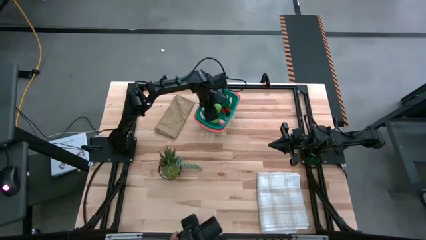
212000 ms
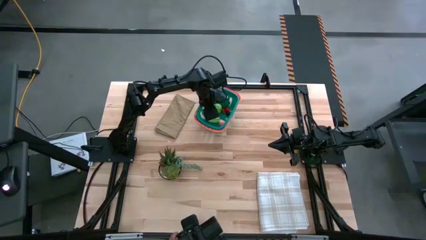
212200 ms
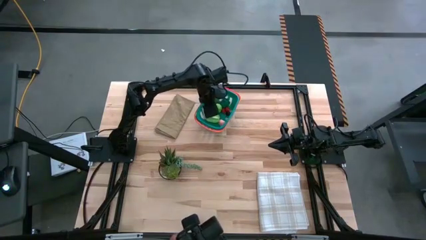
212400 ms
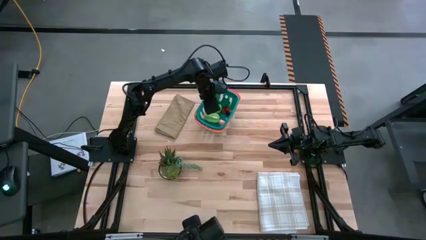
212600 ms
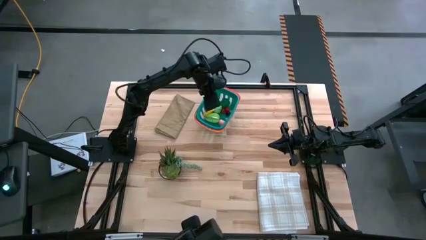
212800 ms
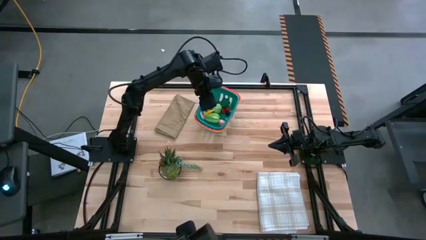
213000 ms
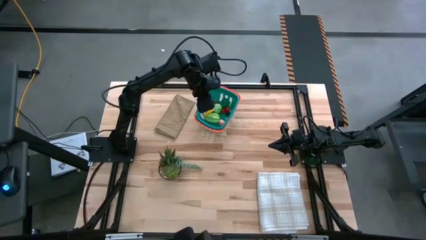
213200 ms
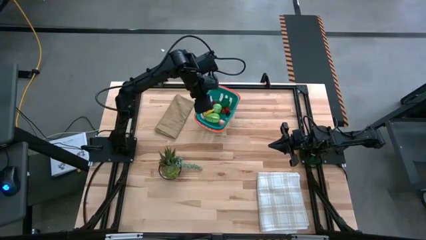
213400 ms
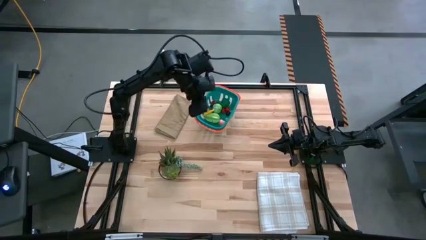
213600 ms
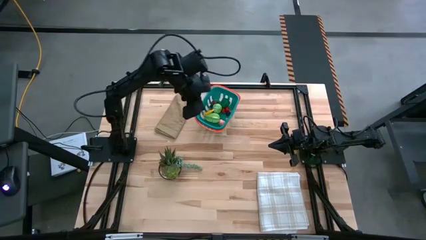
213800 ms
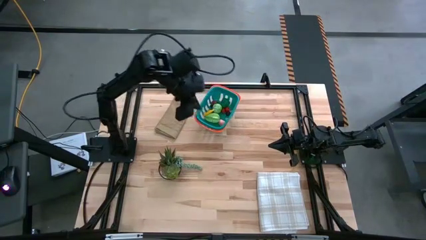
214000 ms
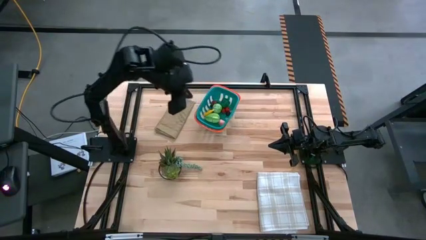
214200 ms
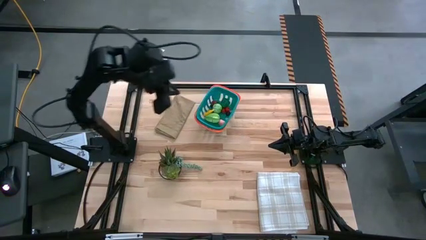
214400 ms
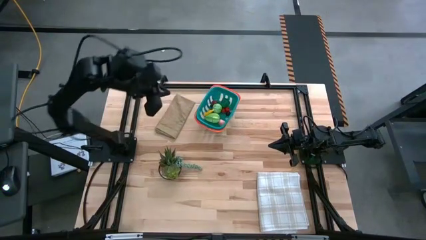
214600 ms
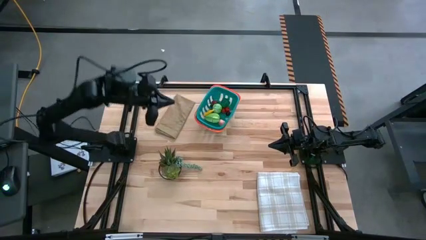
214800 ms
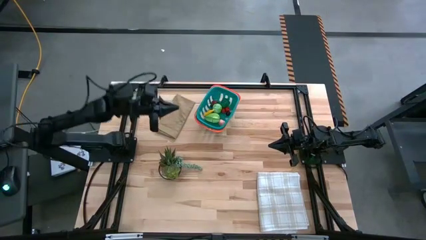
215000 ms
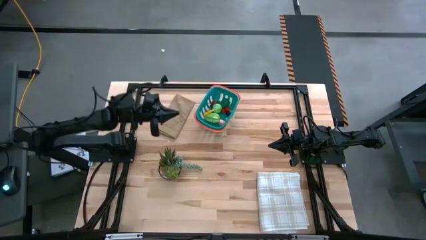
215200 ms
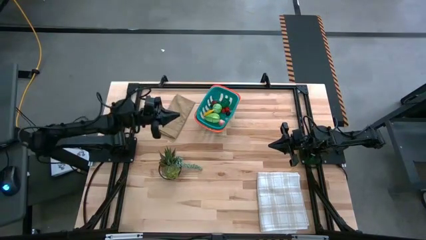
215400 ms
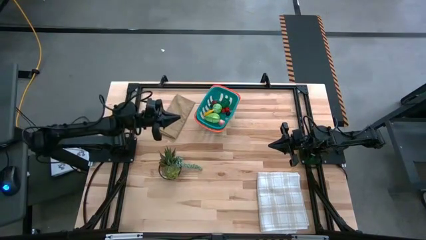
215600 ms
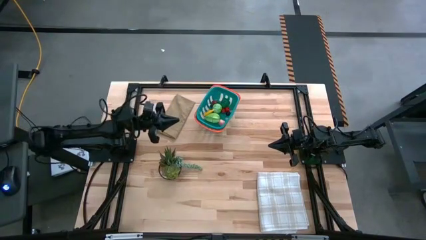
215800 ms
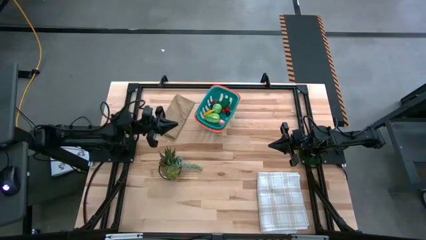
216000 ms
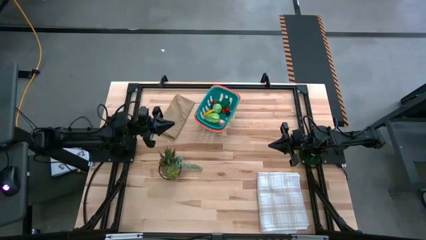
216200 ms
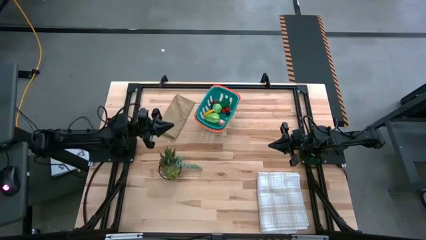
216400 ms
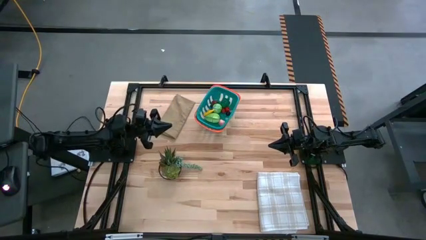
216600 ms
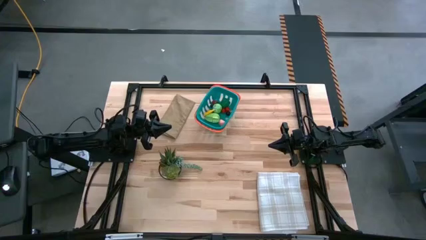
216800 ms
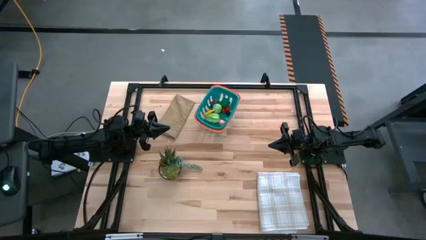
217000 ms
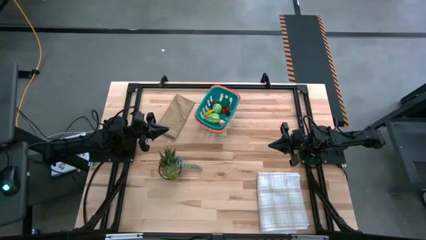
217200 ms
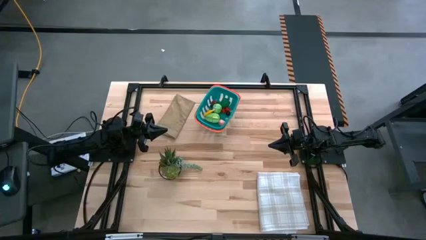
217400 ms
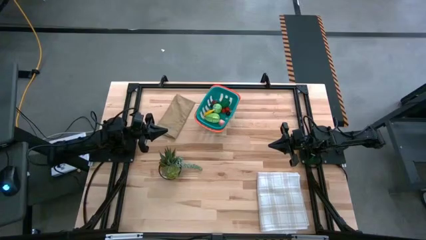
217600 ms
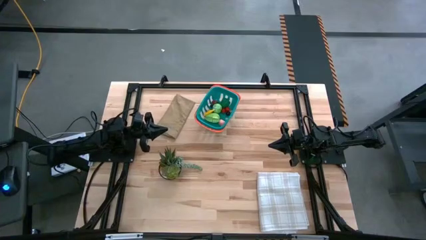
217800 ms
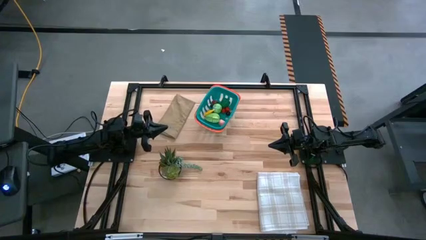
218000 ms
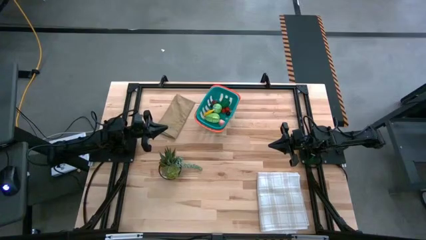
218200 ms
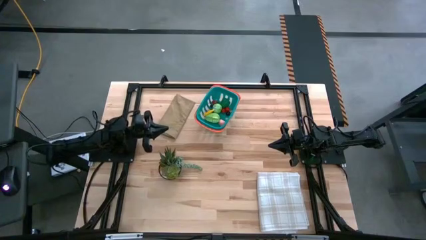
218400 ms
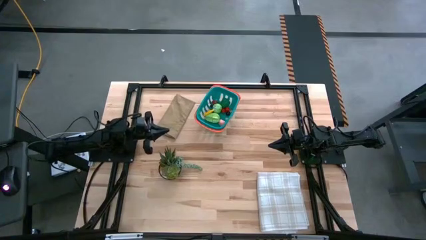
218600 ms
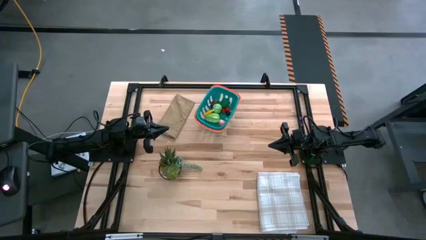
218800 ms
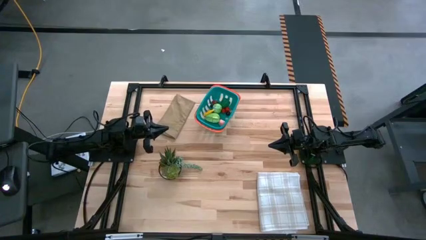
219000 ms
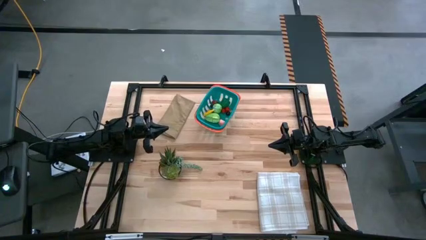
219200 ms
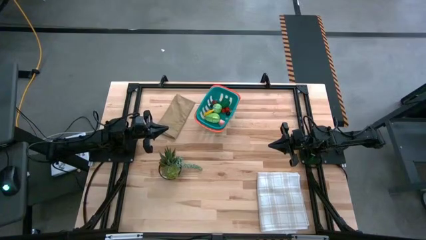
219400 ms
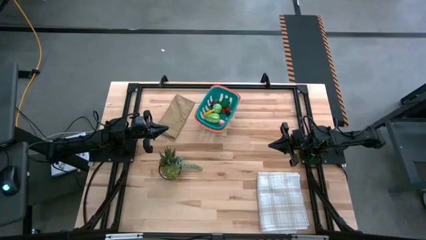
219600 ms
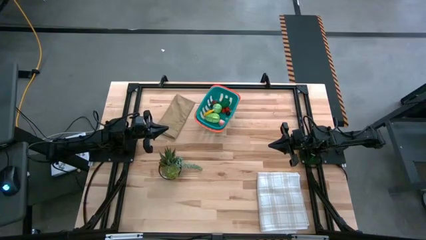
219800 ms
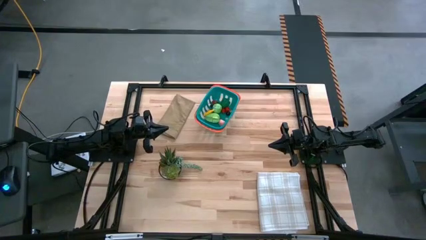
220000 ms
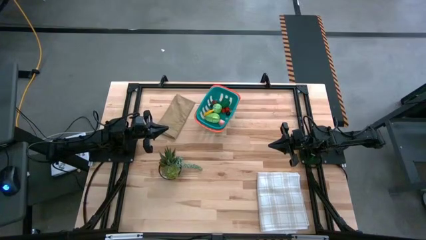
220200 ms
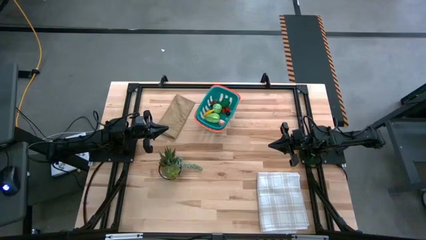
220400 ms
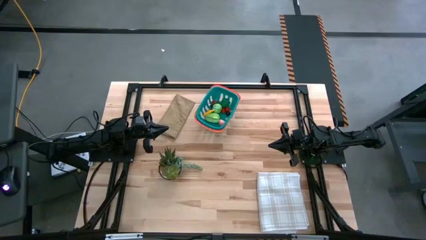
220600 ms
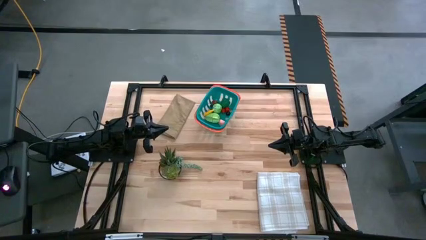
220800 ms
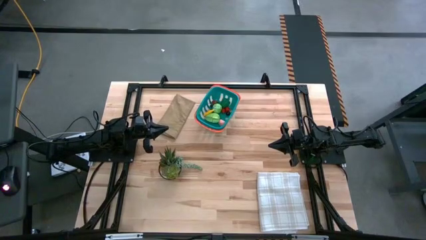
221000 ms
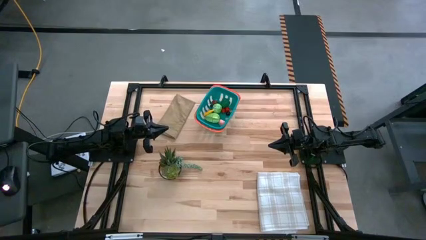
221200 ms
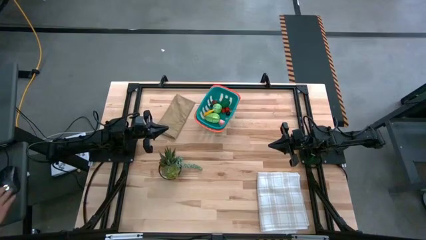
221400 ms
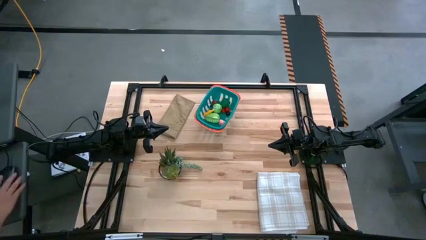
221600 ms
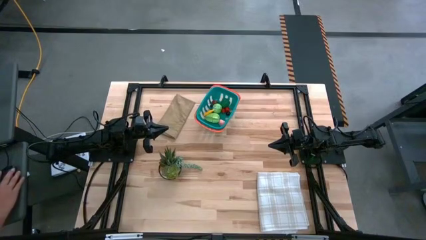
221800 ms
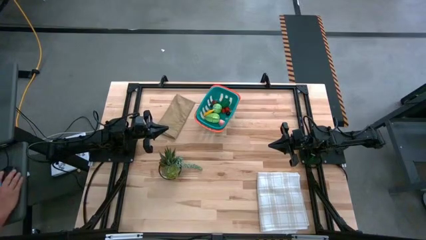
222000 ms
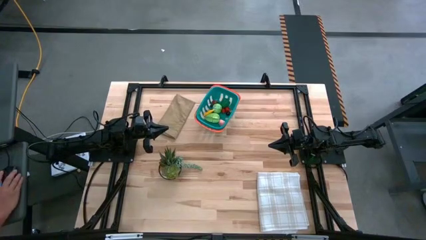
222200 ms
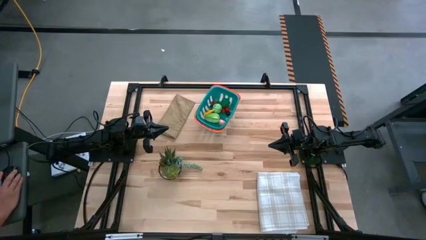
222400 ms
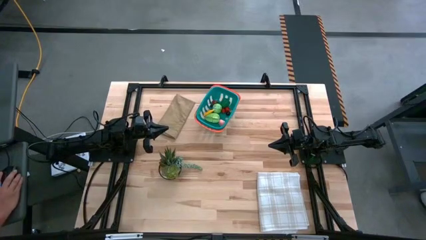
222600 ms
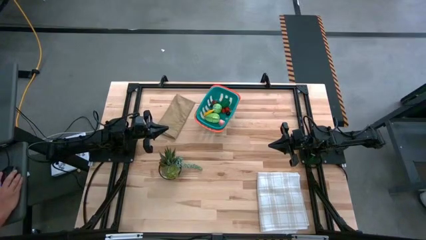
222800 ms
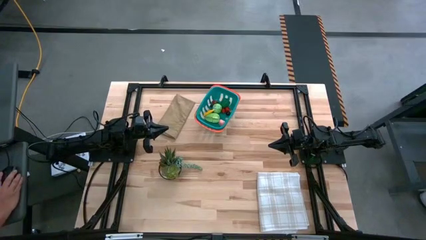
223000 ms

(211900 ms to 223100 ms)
Task: Pick and placing Produce into tupperware
Return to Home Position
